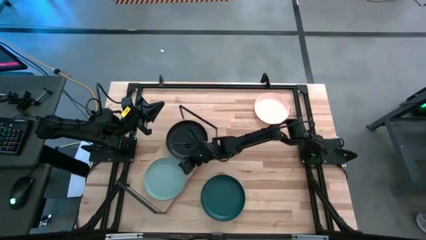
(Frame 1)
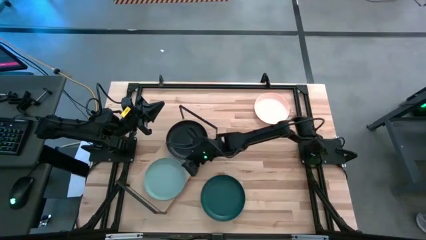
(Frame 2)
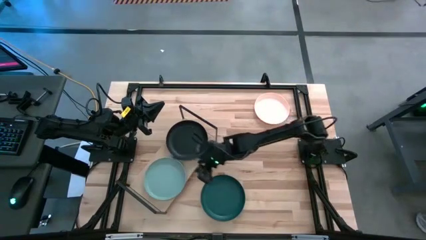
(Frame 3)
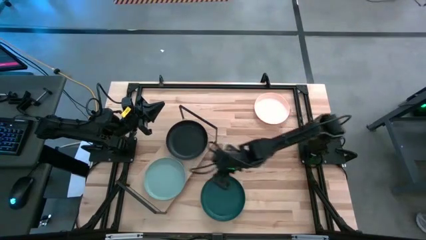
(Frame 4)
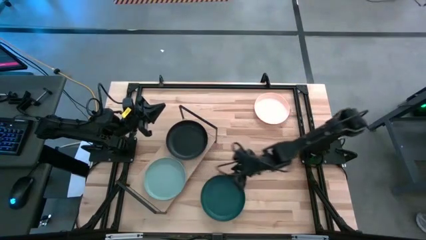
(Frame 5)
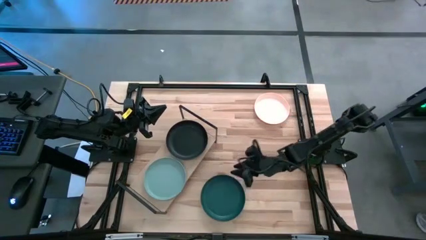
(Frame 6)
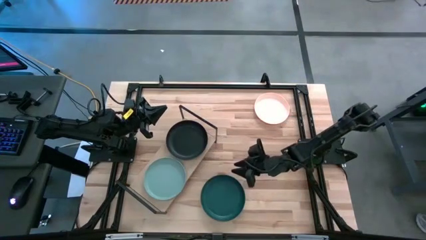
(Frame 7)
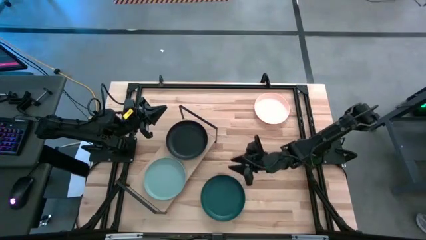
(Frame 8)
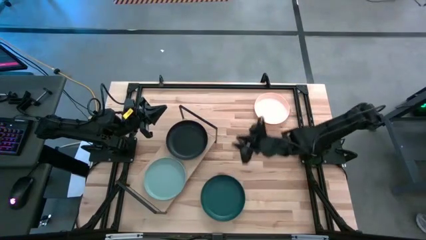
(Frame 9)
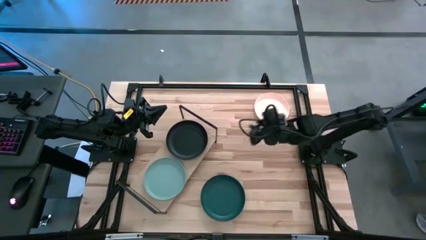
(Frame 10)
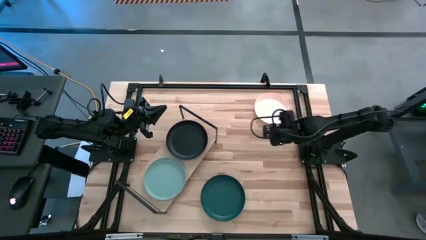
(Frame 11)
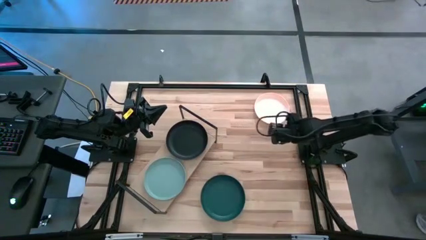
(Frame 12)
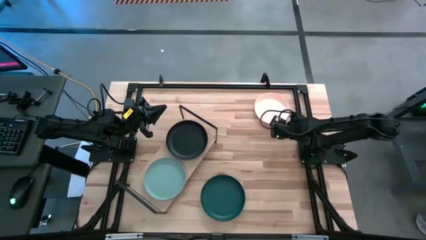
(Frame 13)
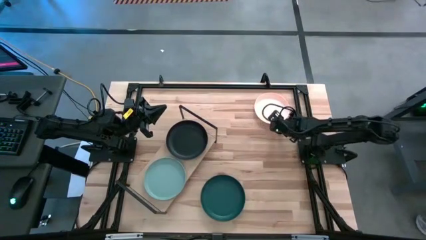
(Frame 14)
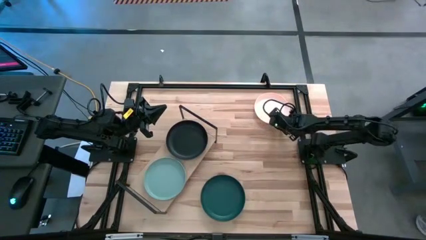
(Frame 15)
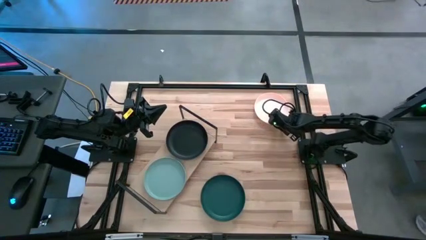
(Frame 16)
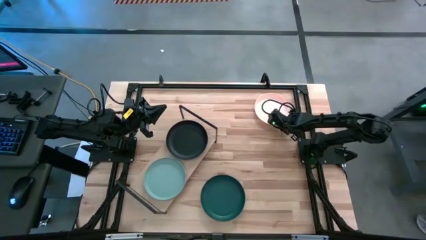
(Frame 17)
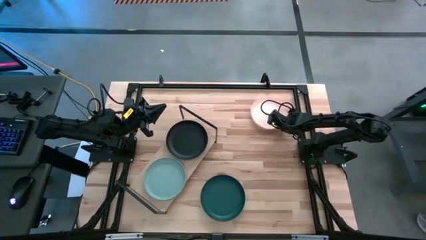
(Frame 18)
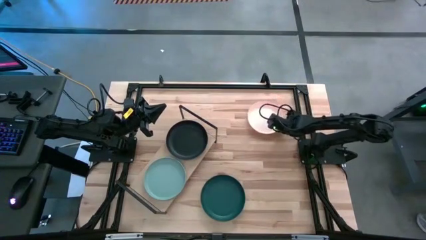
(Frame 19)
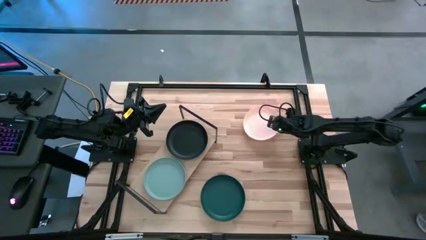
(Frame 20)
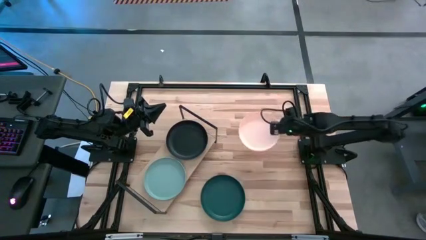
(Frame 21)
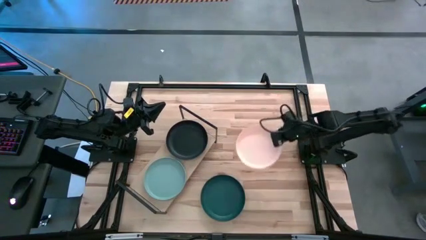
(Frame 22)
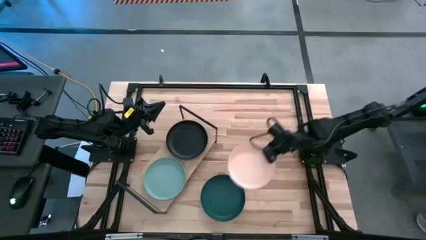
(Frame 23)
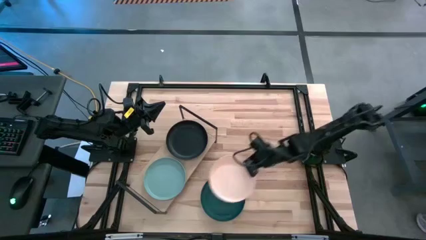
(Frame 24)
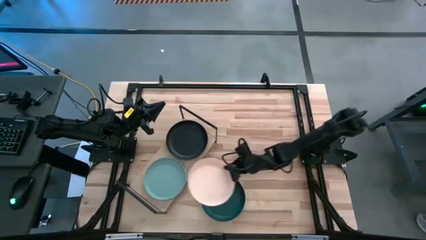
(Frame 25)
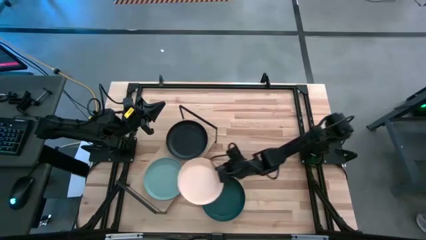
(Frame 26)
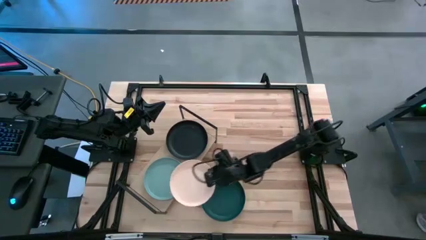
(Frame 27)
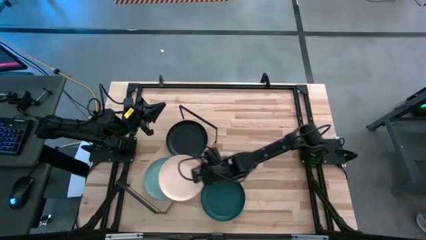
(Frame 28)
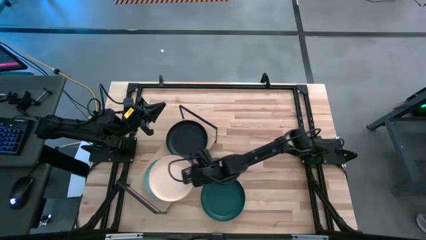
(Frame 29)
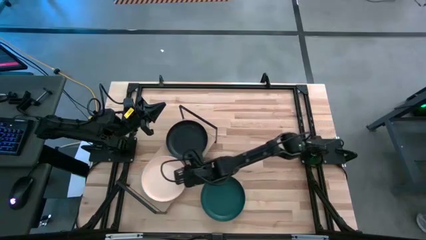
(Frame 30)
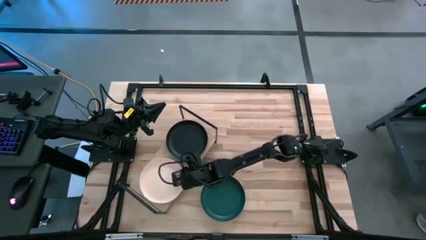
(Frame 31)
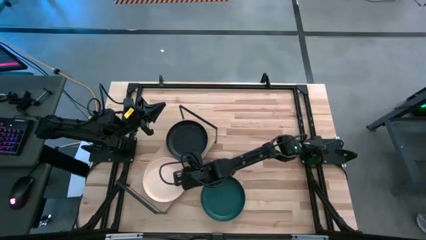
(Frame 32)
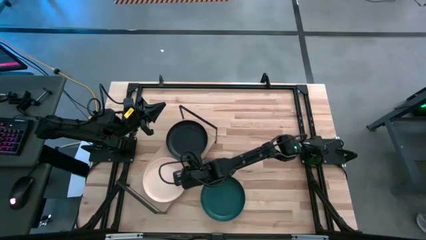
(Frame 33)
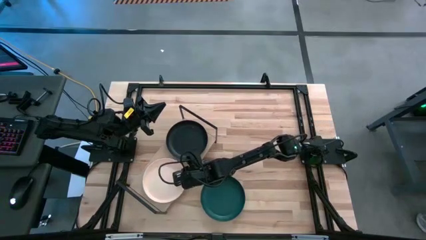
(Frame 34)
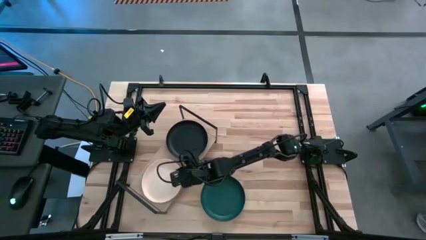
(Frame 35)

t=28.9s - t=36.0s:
Task: Place and stack plates onto a shelf
Stack the white plate on the light blue plate on the shelf

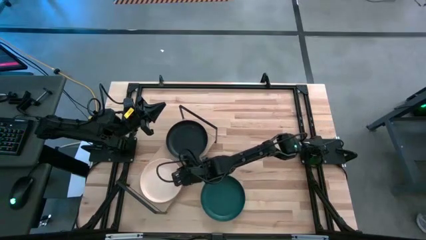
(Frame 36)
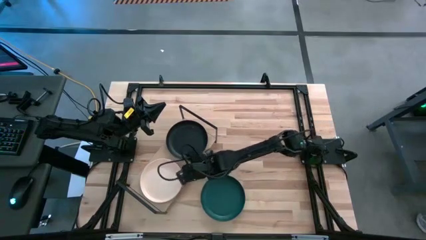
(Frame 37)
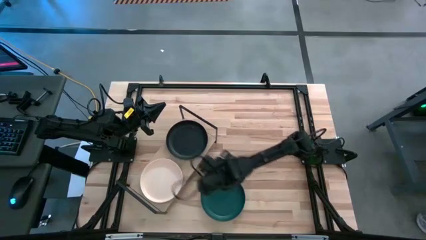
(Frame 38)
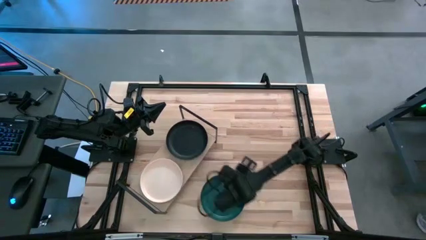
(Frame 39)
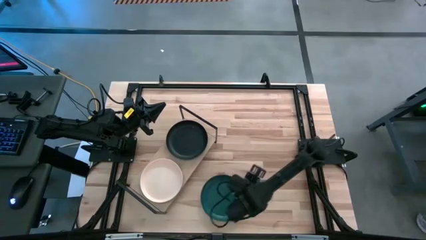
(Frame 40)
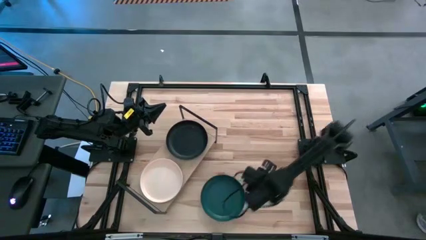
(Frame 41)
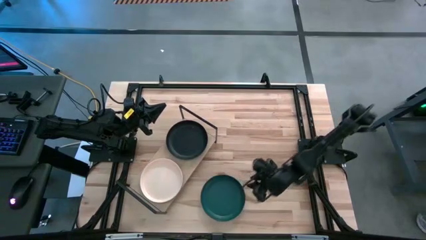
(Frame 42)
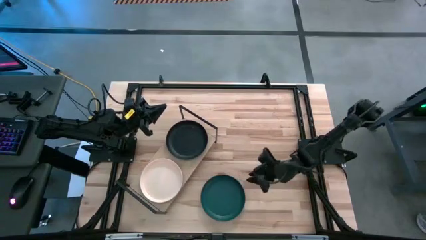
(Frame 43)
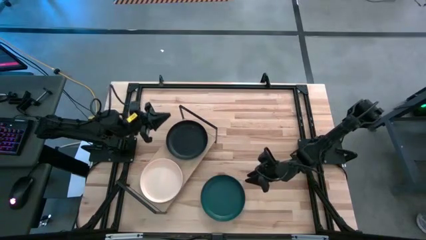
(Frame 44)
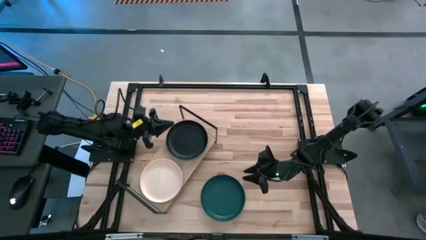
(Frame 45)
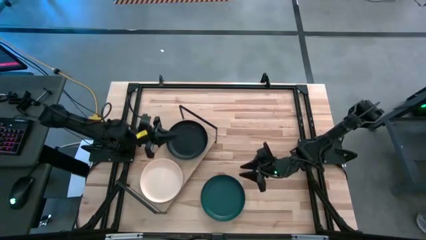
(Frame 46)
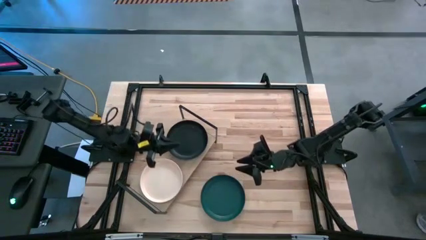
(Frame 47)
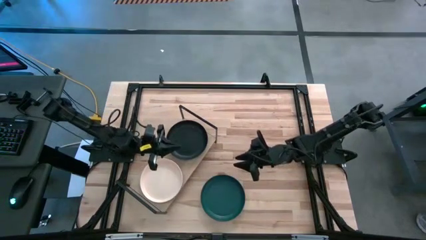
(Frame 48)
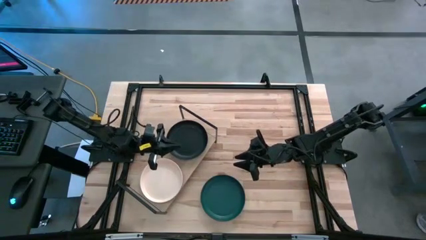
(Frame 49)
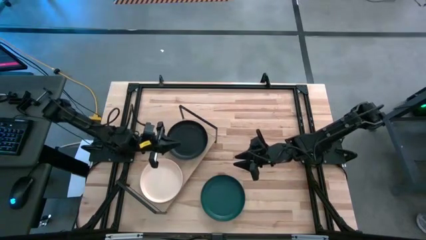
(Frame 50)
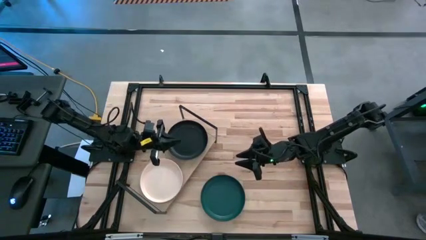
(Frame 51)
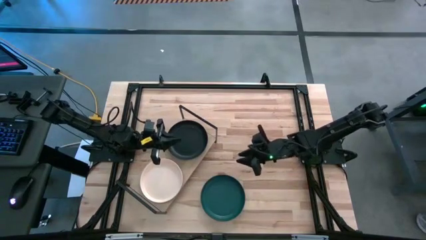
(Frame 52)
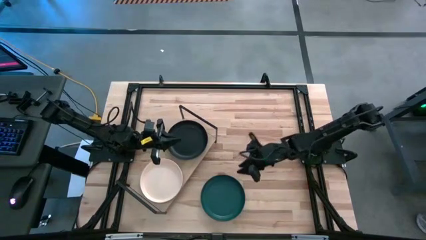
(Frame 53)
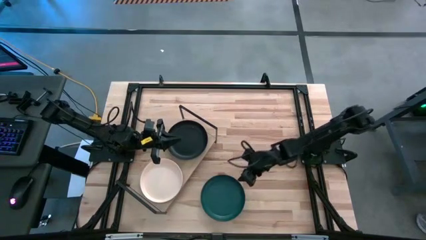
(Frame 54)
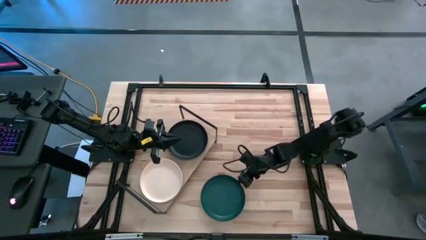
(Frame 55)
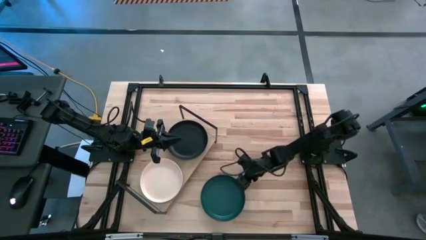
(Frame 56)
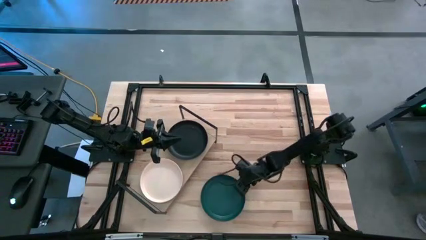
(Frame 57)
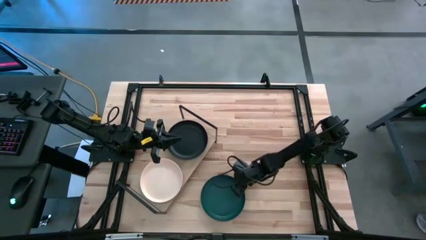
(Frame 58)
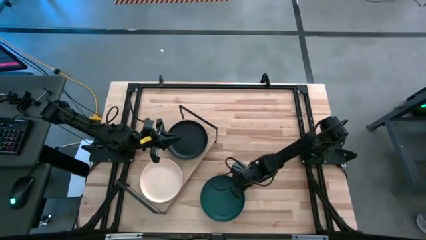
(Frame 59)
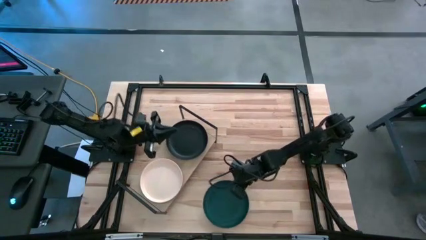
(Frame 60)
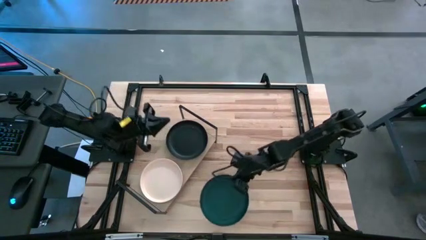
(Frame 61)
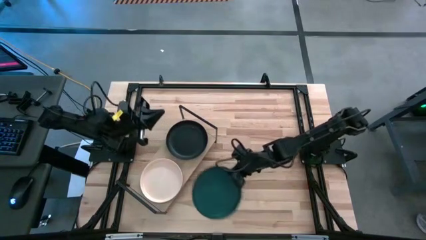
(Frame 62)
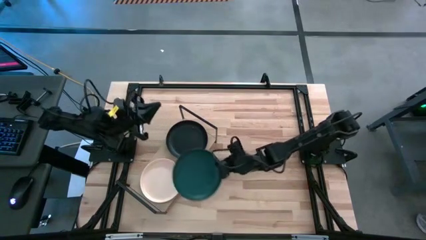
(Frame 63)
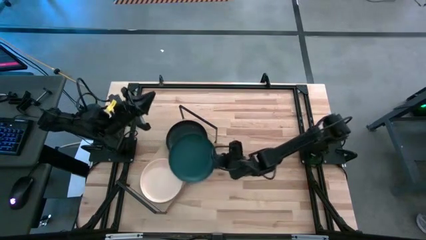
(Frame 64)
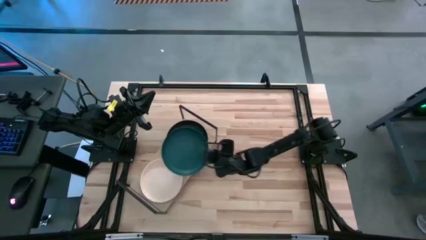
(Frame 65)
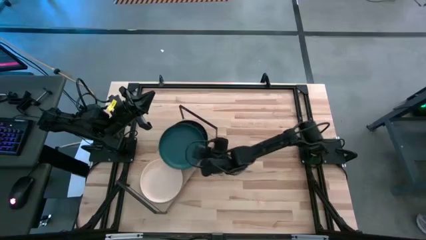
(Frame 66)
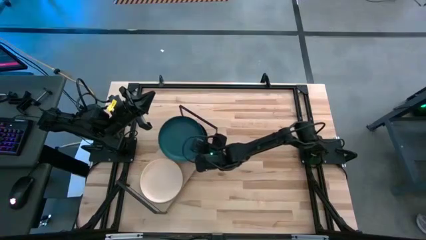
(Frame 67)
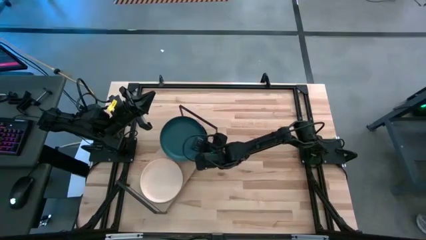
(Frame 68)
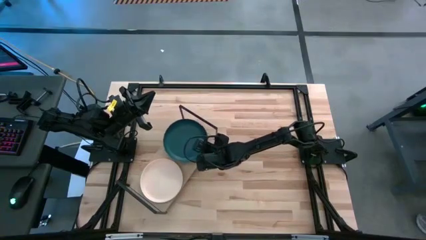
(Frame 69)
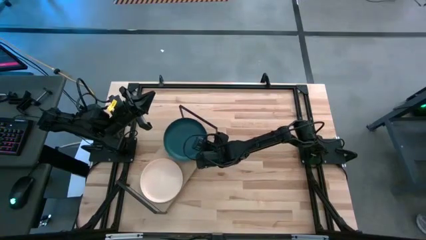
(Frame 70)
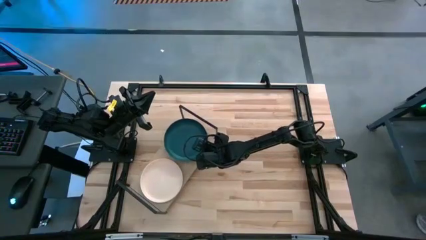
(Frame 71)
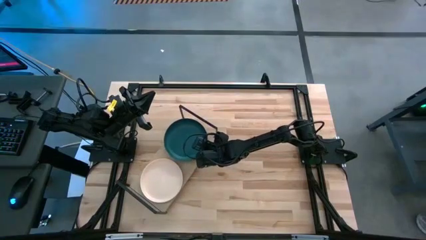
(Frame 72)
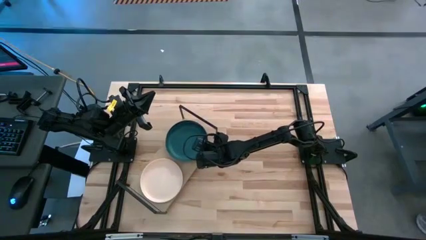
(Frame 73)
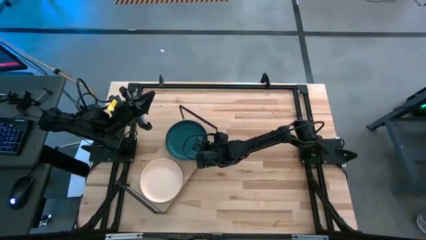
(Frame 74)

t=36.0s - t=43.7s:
Stack the green plate on the black plate on the shelf

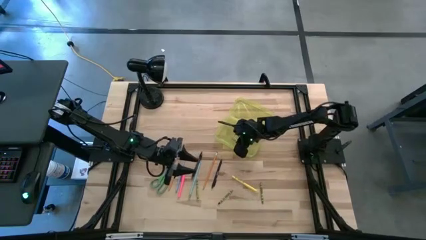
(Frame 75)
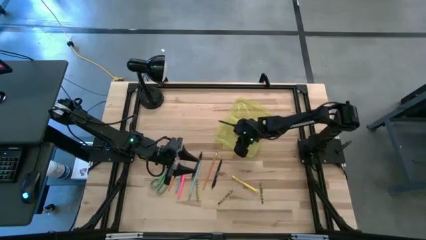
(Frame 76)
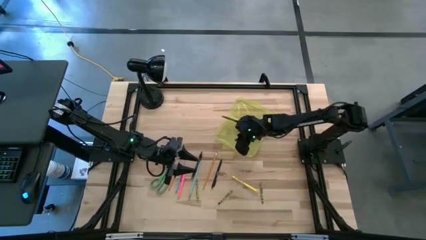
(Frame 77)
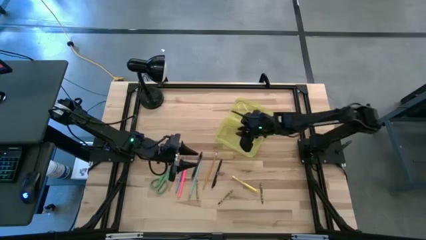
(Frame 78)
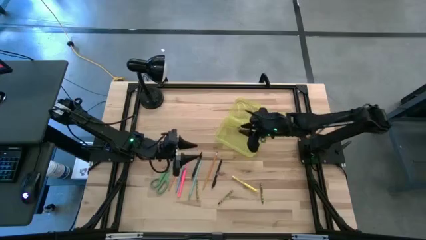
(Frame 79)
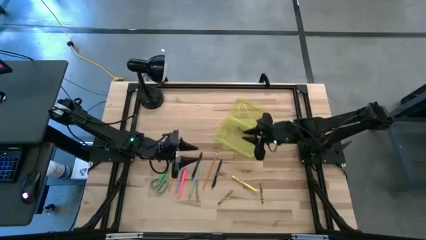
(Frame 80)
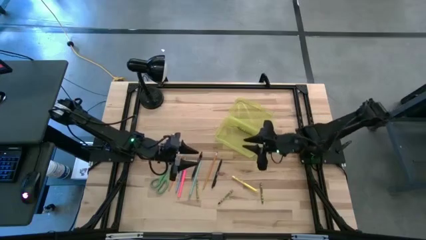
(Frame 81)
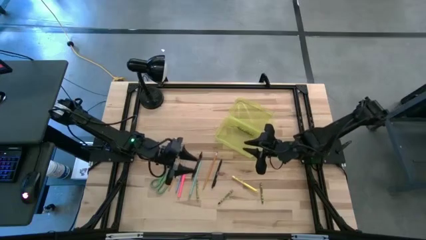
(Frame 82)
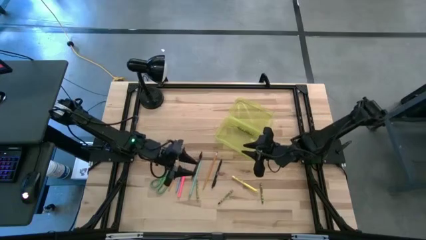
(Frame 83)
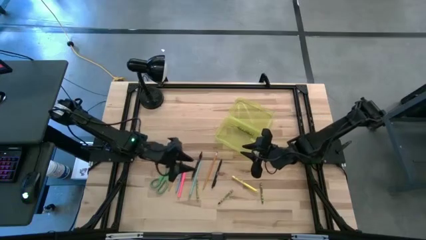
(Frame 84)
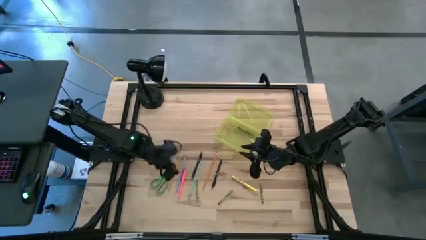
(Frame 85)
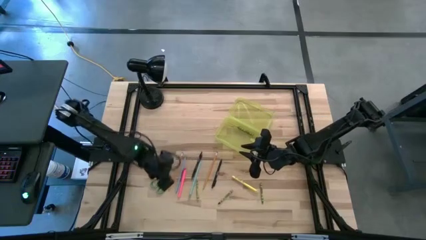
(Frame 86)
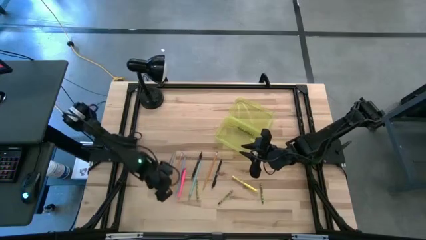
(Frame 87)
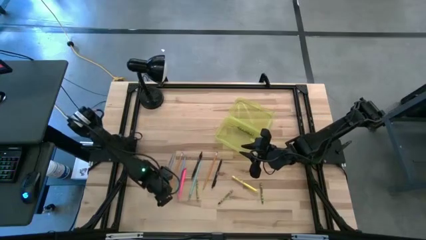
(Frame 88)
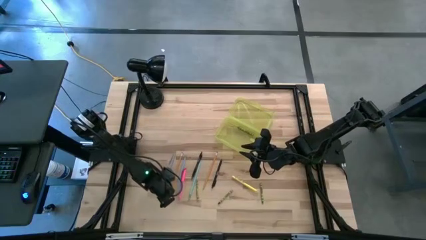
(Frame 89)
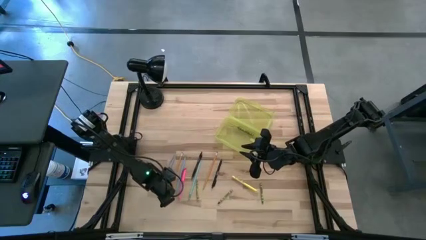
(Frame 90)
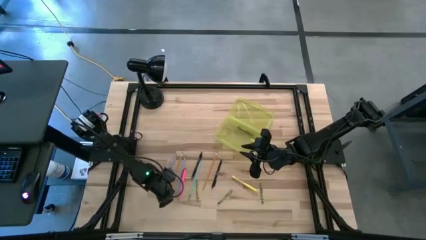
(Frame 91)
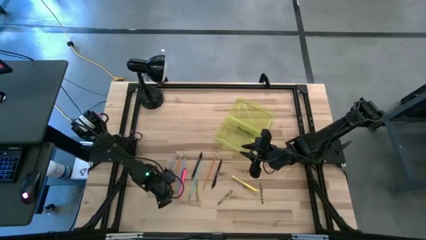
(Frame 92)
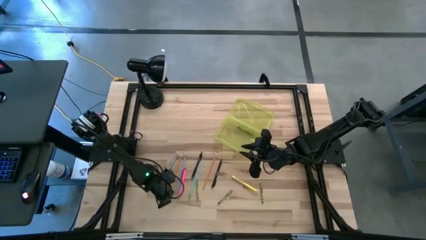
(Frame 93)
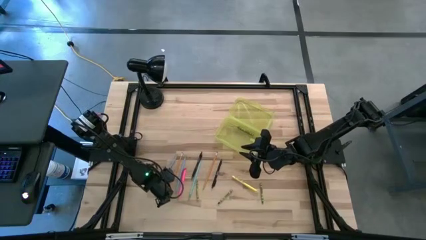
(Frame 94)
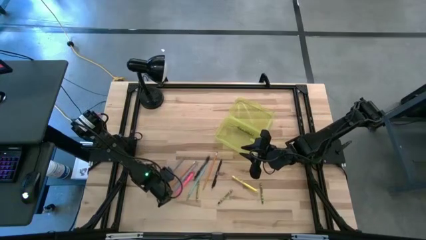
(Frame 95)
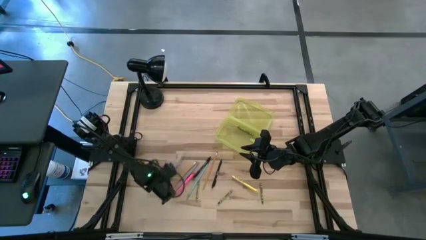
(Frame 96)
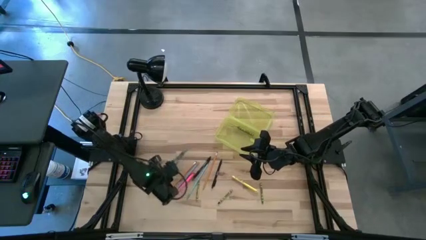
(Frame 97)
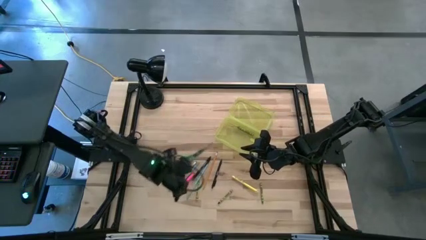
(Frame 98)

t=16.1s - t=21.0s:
Task: Pick & place school supplies into a supply box
Put the green scissors into the yellow supply box
